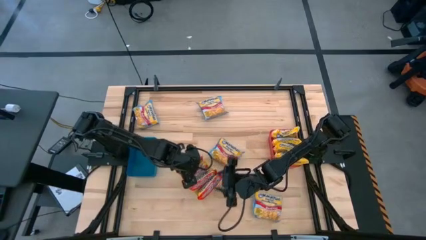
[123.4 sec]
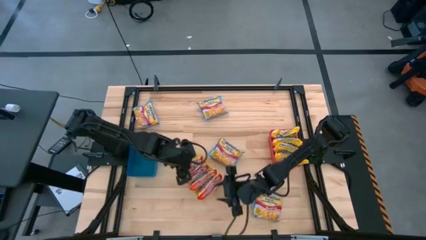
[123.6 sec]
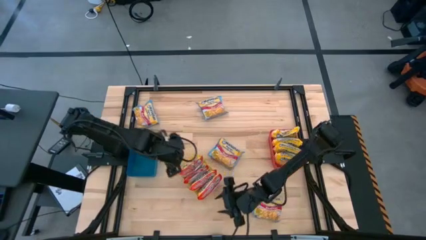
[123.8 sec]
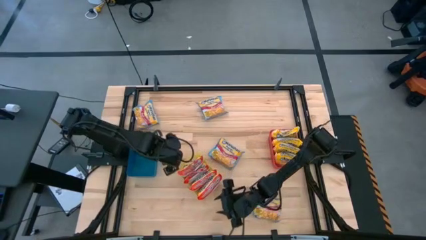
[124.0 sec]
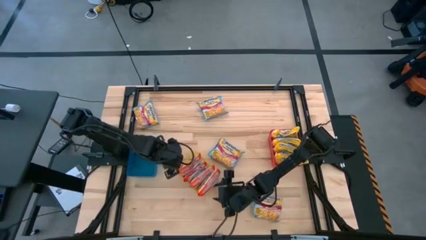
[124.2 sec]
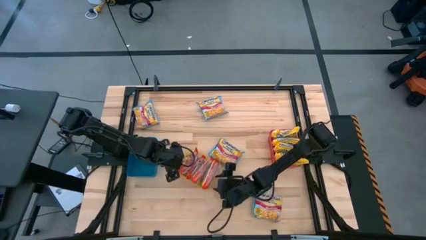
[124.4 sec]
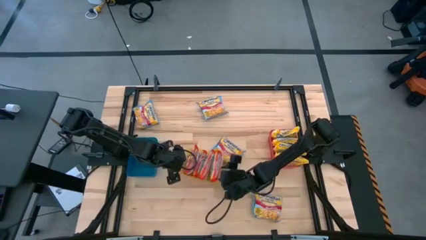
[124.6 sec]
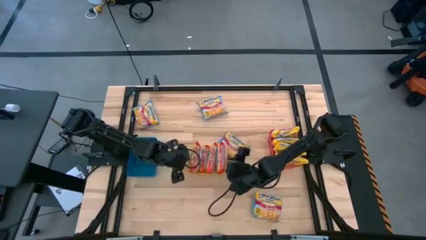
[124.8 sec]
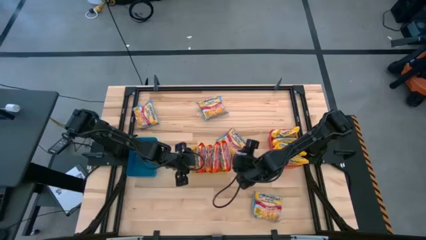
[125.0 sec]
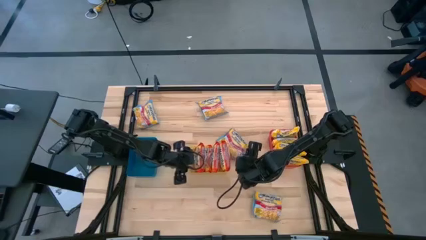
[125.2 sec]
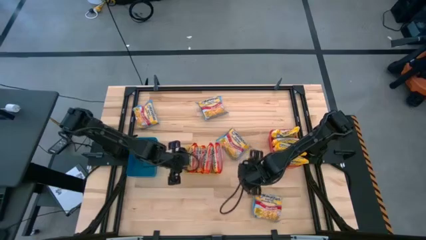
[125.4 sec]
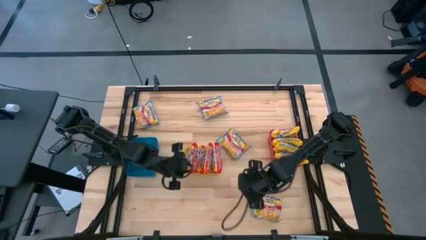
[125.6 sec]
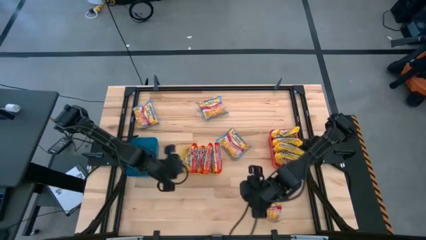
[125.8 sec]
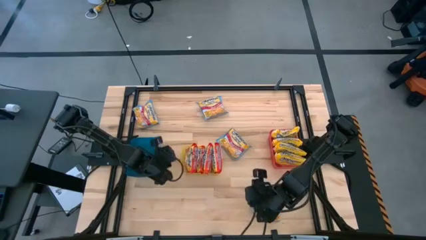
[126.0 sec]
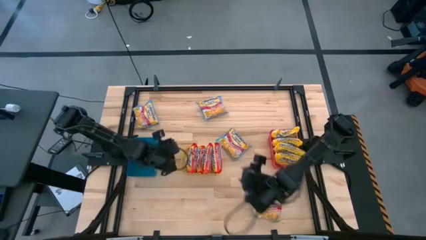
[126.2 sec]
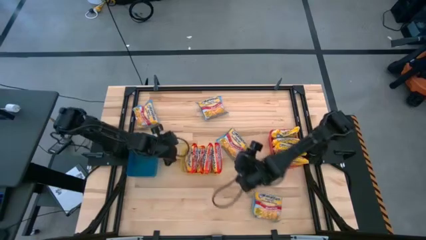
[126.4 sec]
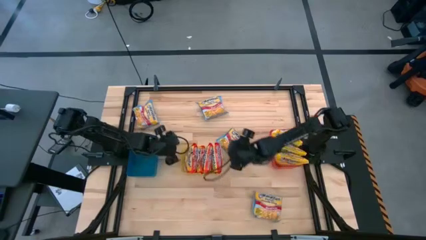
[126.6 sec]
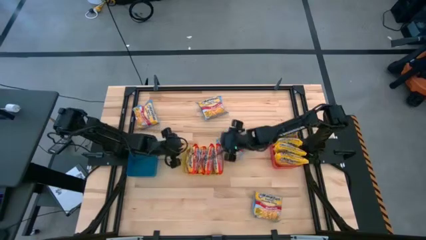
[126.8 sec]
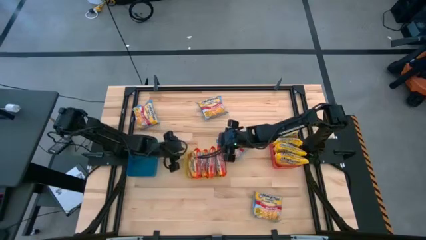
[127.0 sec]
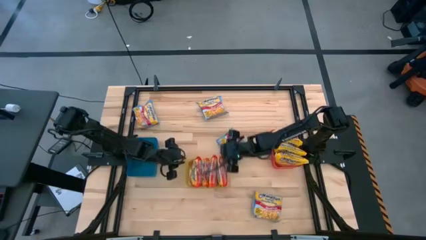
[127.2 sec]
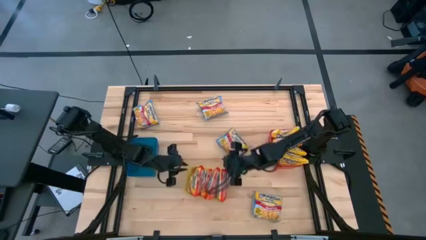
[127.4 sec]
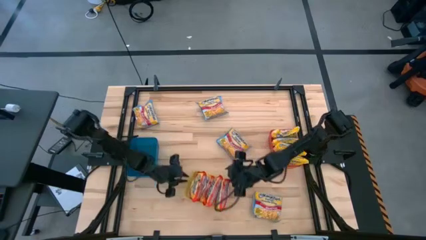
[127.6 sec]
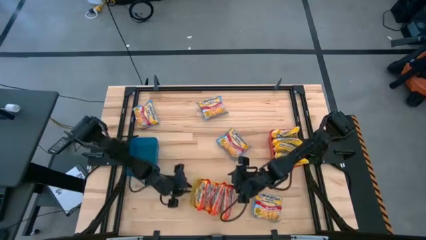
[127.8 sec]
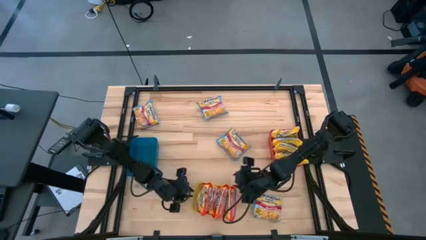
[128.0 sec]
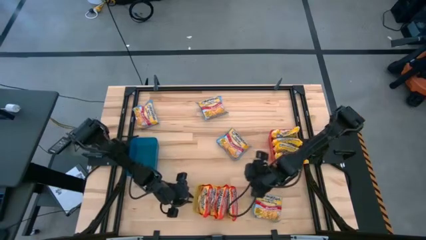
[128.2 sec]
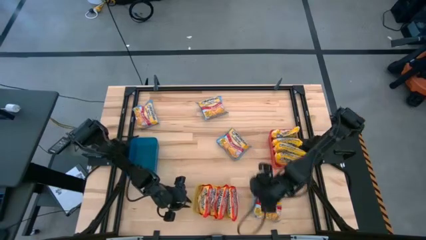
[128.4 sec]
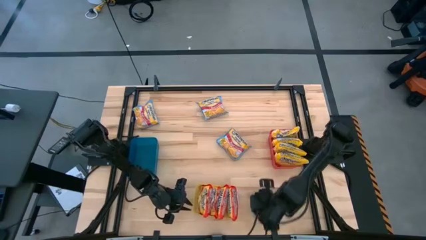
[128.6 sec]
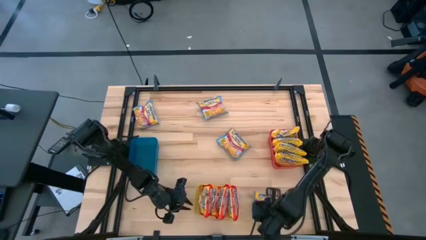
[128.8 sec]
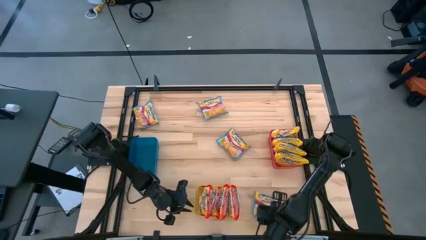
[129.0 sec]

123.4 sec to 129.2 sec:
Task: Sort Maruchan noodles
Adjust the yellow bin on the table

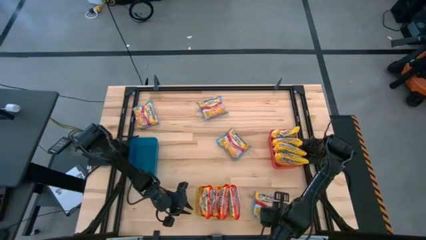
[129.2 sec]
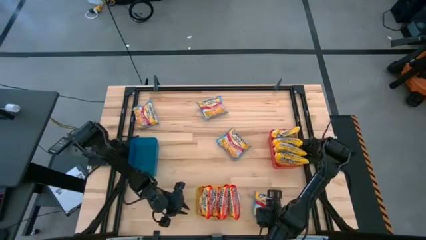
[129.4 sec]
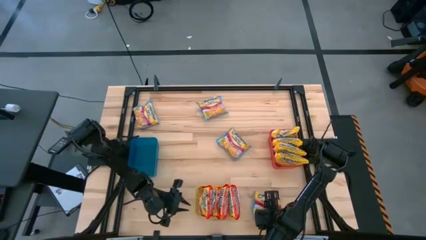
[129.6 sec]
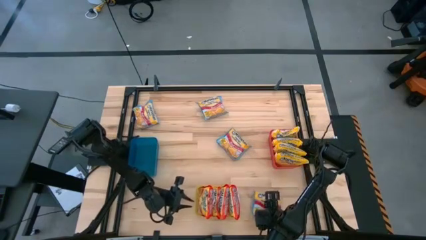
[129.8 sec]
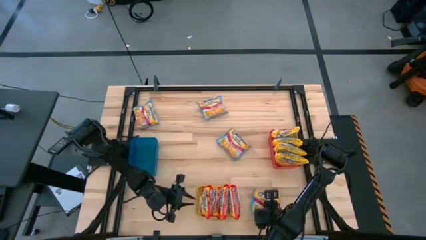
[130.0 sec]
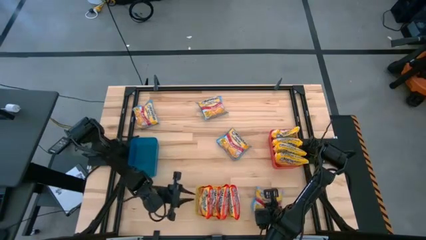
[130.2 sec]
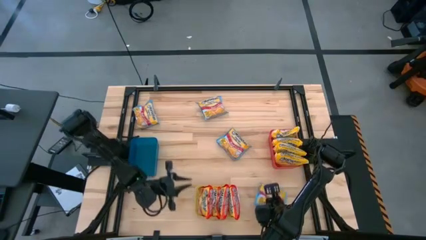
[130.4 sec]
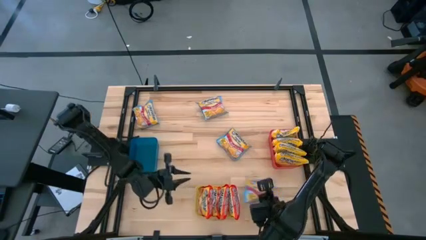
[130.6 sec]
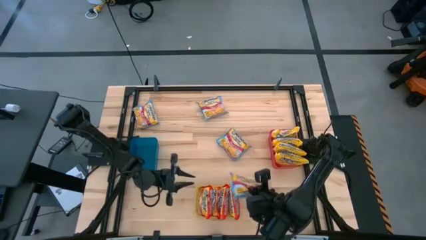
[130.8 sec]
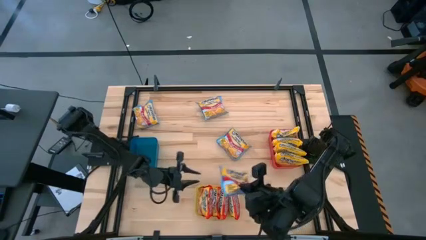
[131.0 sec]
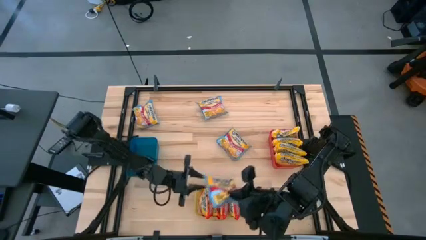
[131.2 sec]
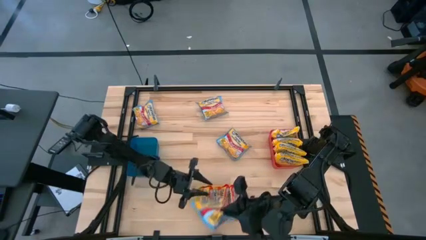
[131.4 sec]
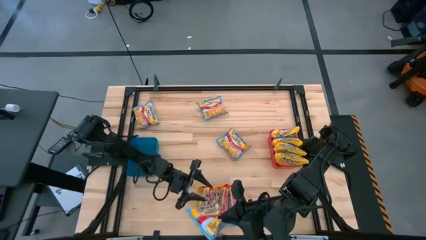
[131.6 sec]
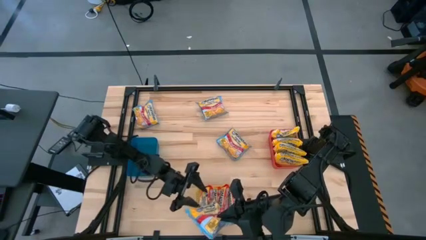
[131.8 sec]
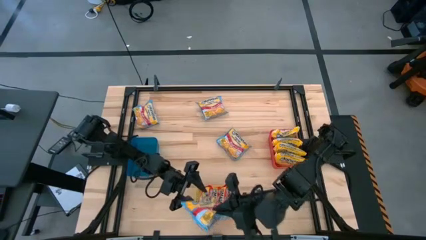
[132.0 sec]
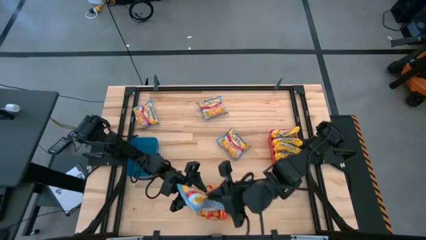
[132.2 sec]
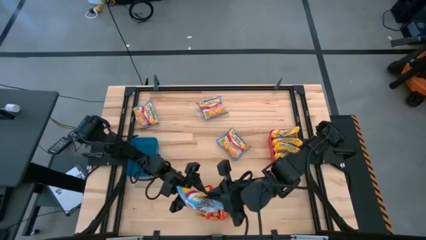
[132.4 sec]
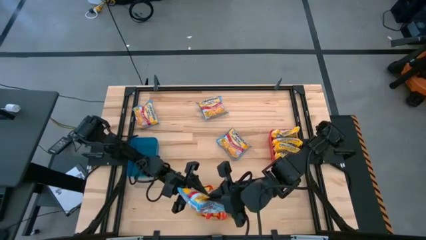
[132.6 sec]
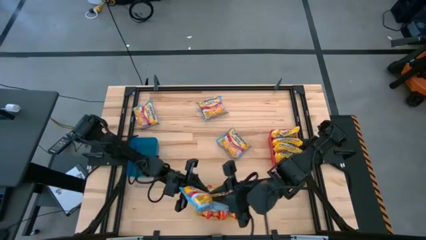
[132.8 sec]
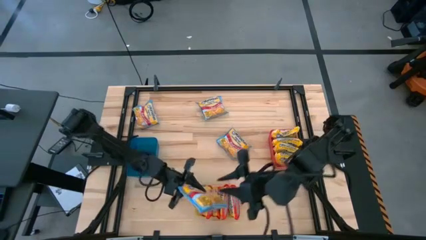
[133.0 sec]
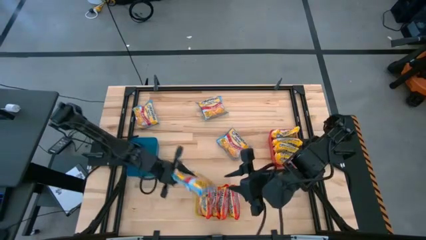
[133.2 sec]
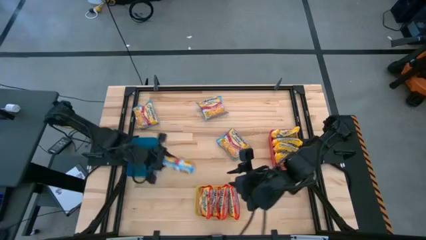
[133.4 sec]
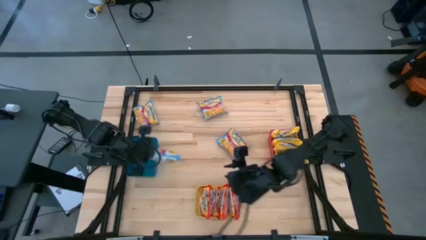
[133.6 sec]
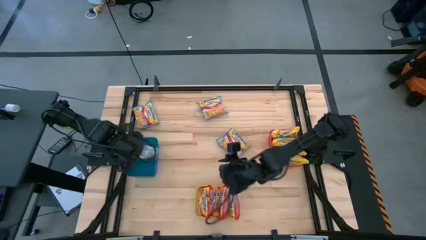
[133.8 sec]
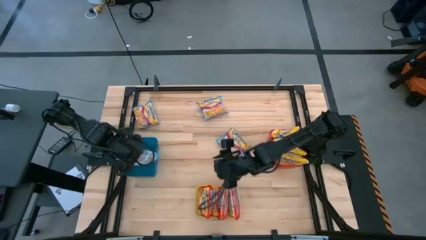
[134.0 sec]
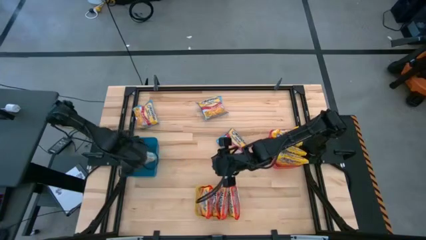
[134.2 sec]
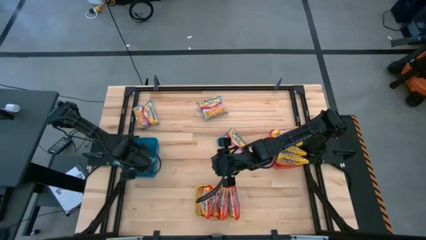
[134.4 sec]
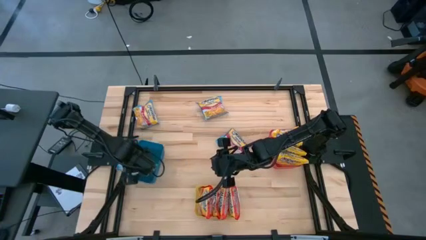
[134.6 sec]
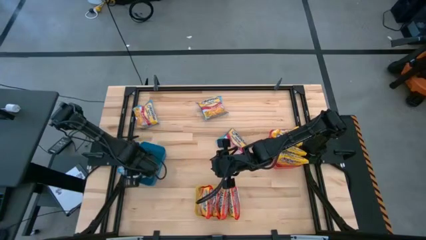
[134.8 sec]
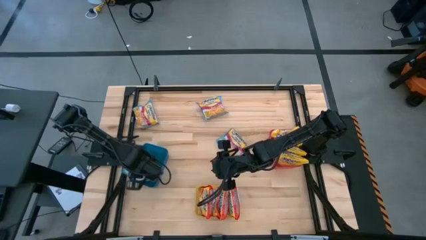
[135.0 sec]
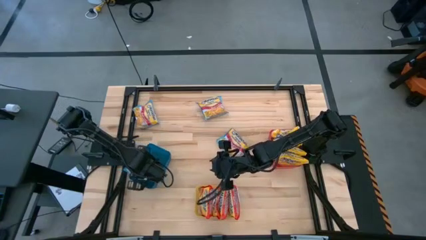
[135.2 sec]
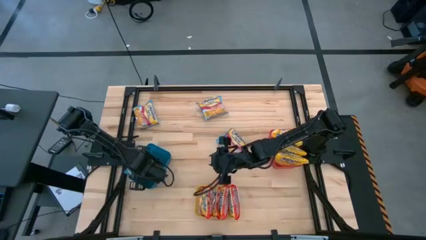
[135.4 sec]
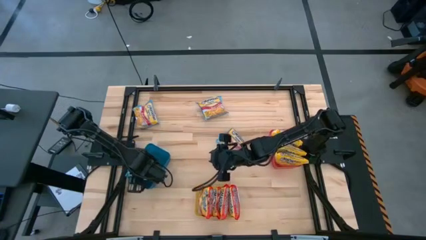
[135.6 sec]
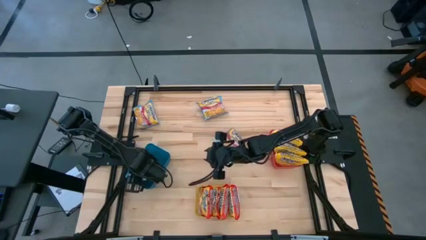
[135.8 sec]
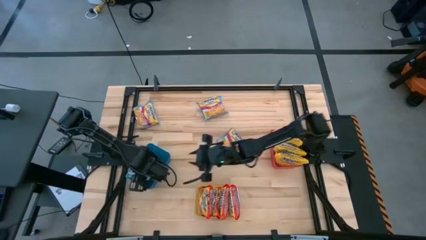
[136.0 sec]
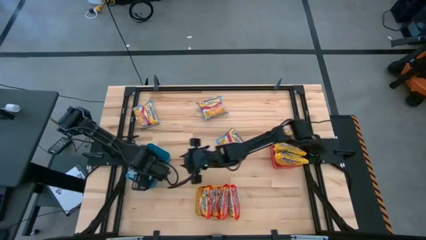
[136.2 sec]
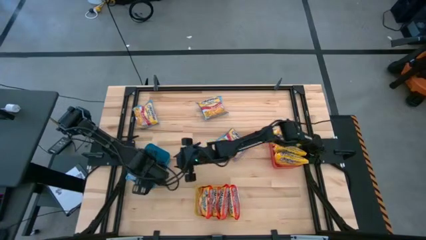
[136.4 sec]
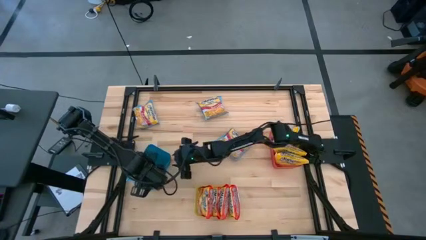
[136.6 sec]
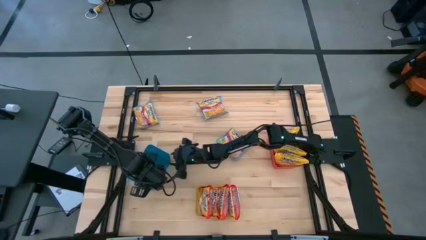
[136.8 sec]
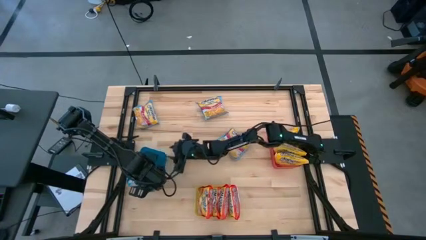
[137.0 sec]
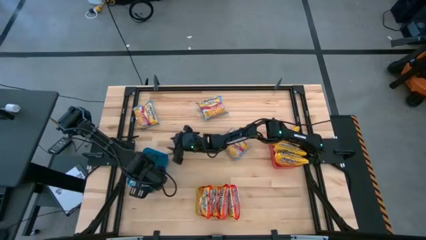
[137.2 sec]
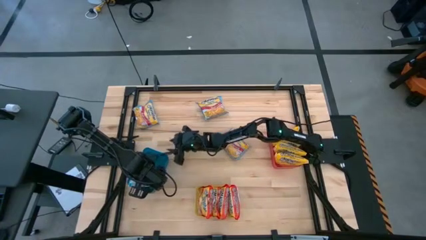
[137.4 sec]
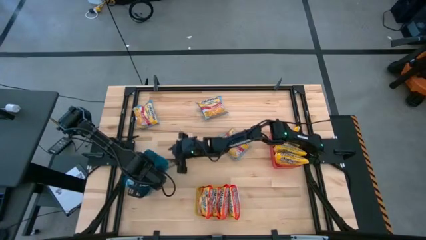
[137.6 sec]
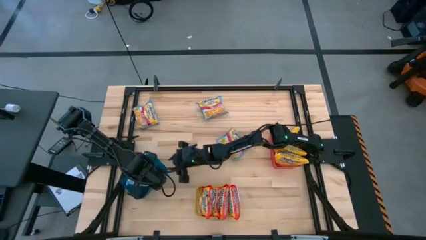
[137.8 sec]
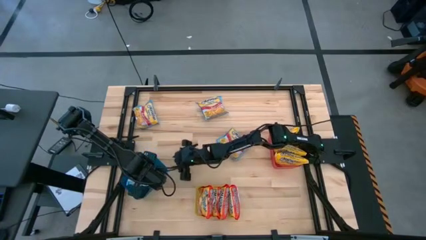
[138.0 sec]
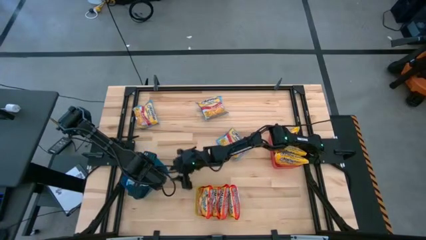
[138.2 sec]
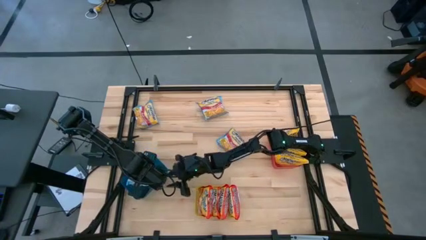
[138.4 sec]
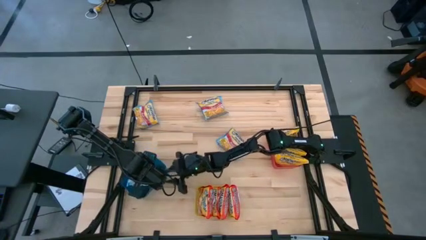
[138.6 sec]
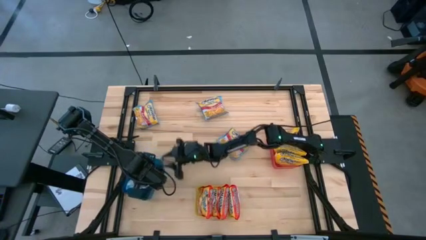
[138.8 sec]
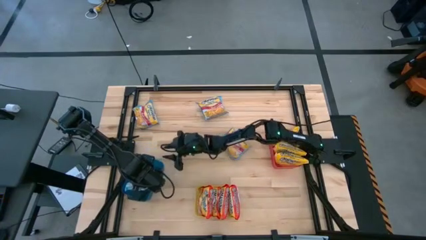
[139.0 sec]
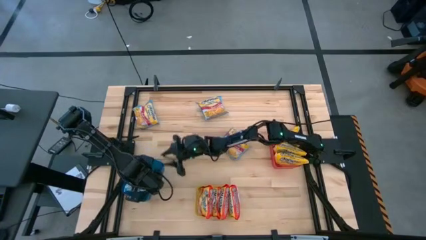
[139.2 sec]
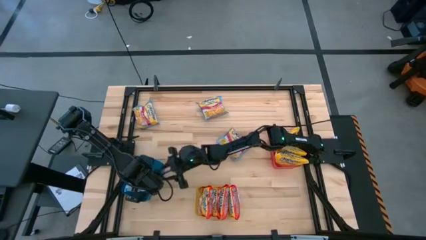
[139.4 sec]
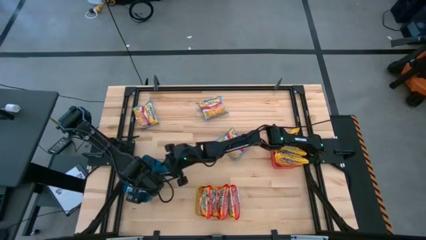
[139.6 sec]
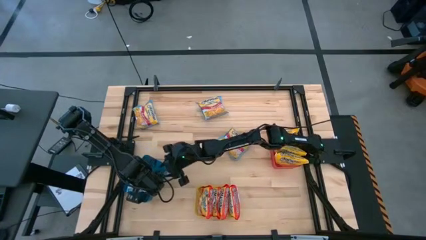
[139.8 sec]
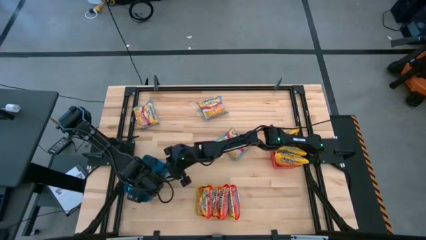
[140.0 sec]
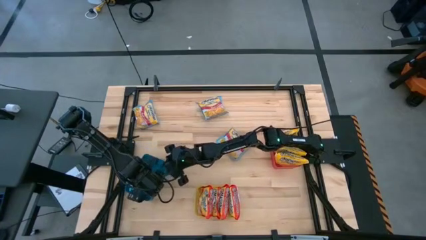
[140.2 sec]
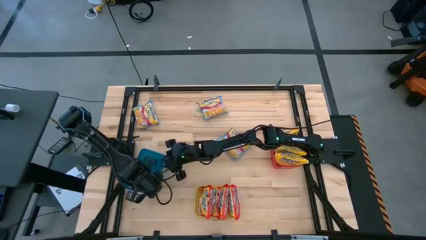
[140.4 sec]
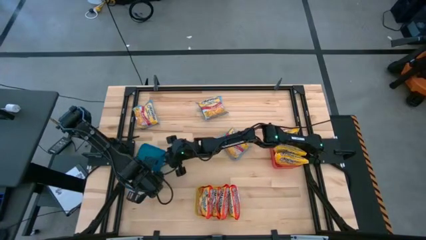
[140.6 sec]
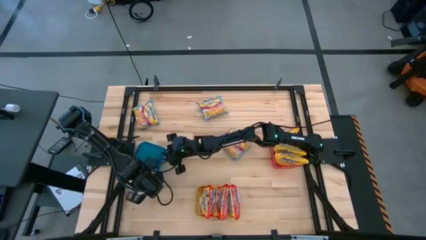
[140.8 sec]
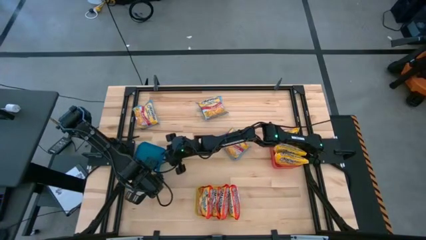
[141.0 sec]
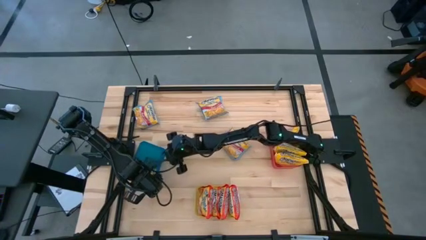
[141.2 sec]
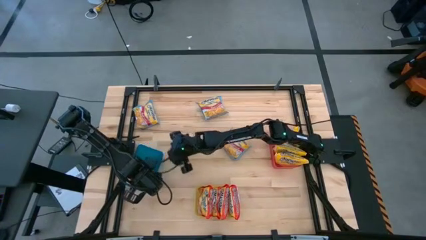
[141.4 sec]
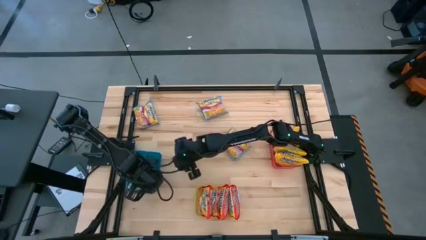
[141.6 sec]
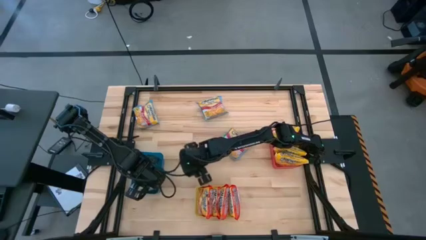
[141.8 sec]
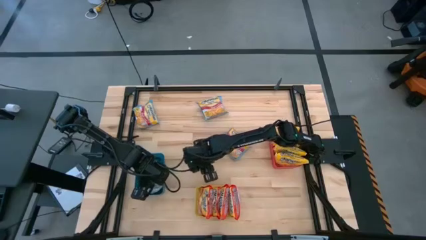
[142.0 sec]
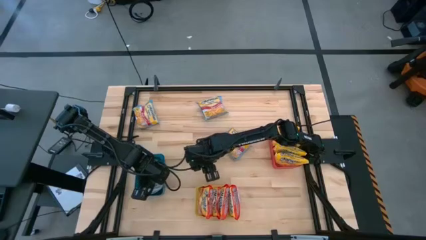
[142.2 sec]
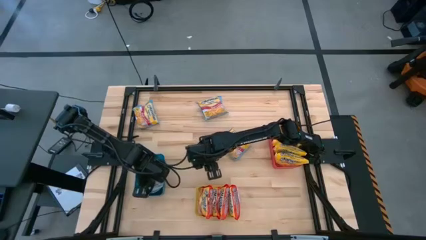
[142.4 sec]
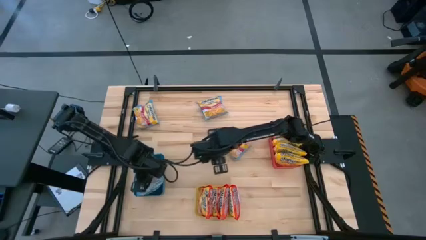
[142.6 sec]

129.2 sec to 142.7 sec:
Put the blue noodle pack into the blue bin
